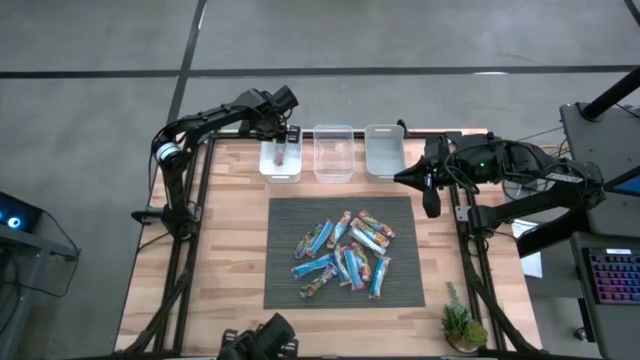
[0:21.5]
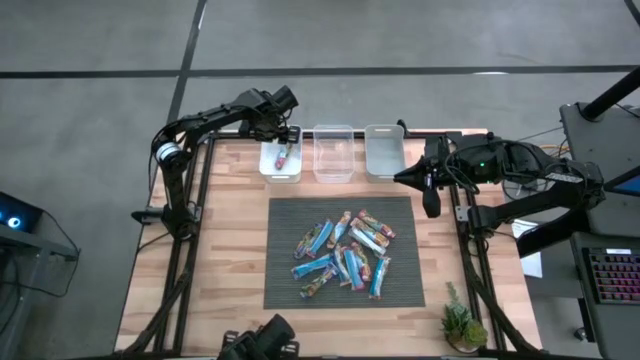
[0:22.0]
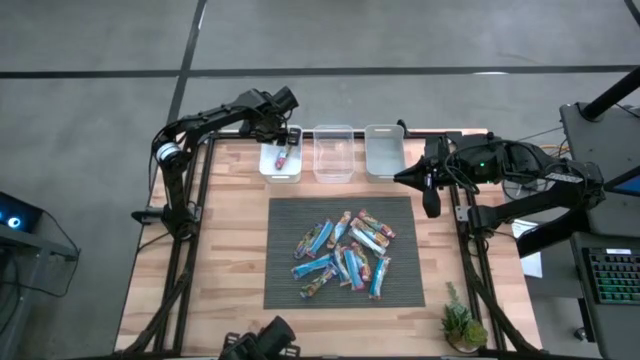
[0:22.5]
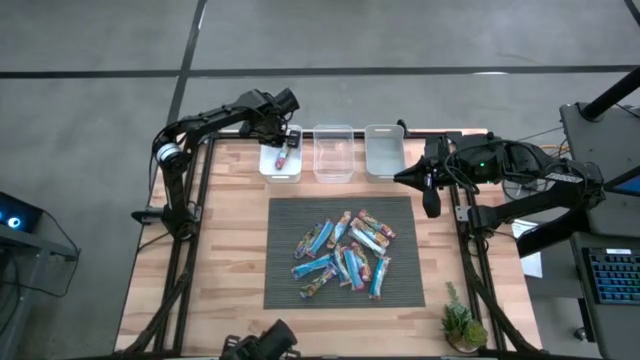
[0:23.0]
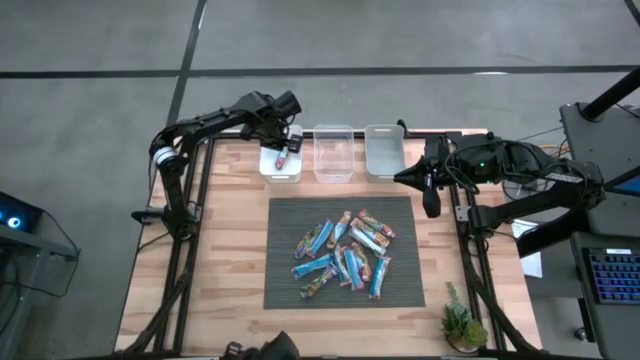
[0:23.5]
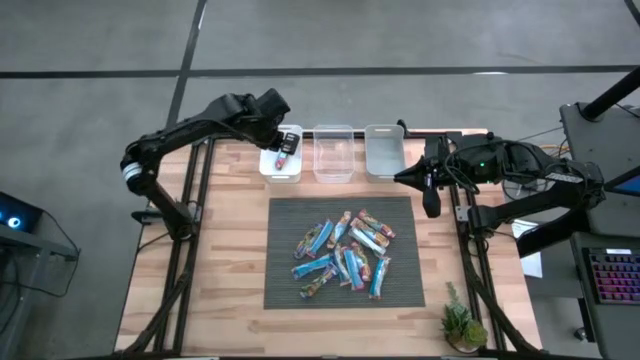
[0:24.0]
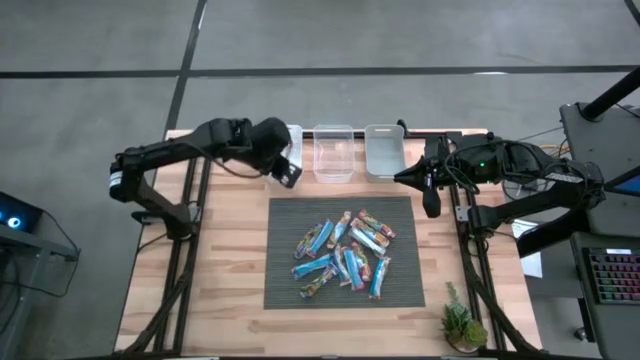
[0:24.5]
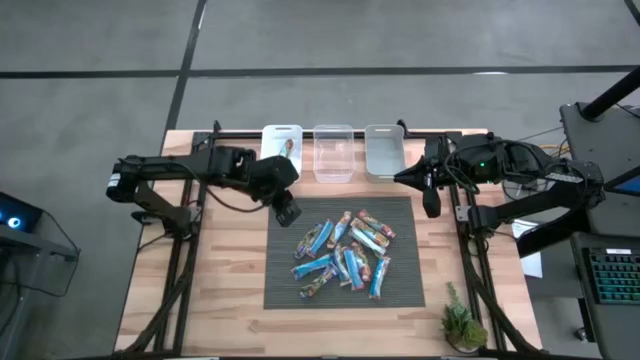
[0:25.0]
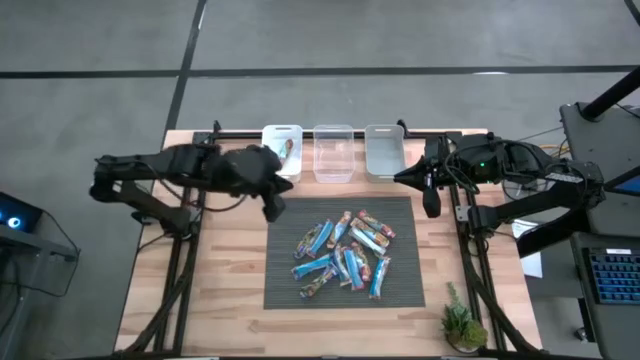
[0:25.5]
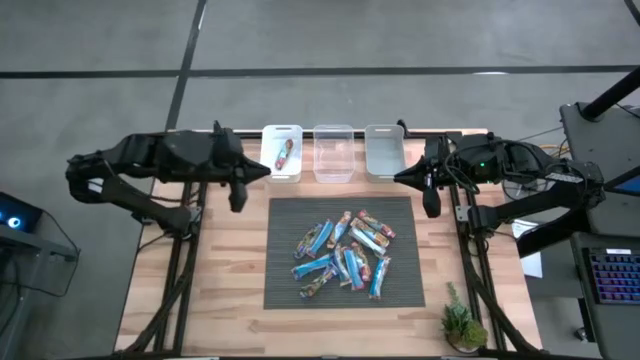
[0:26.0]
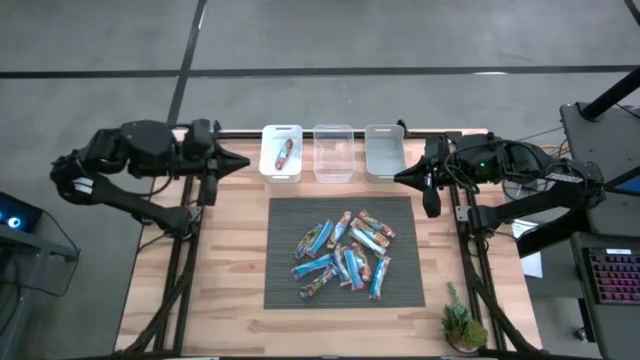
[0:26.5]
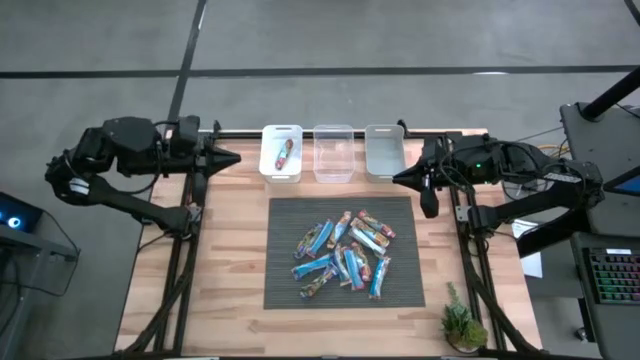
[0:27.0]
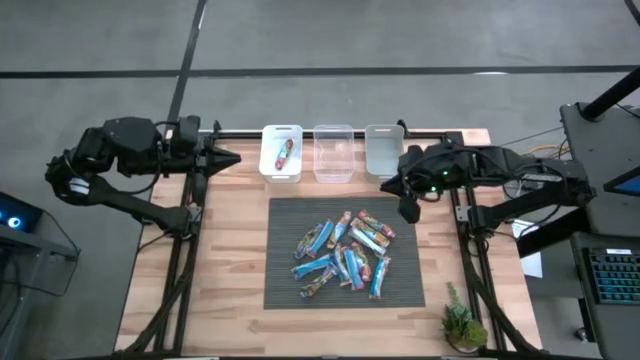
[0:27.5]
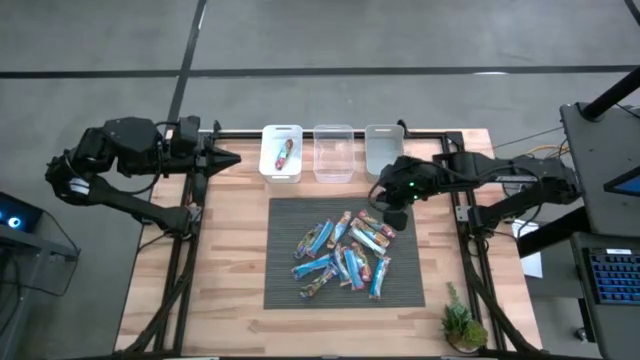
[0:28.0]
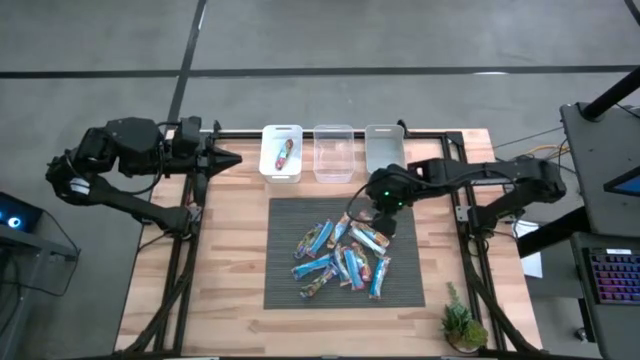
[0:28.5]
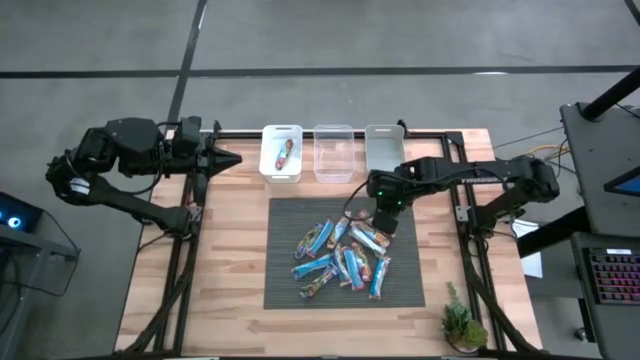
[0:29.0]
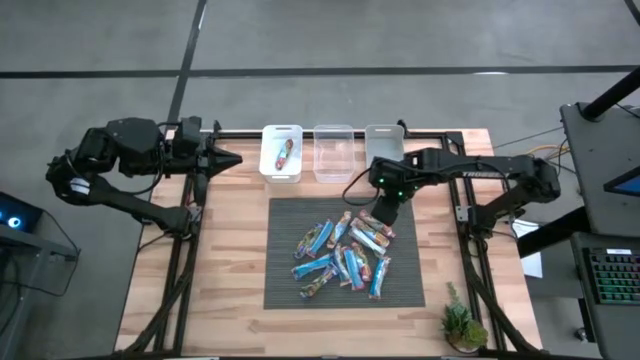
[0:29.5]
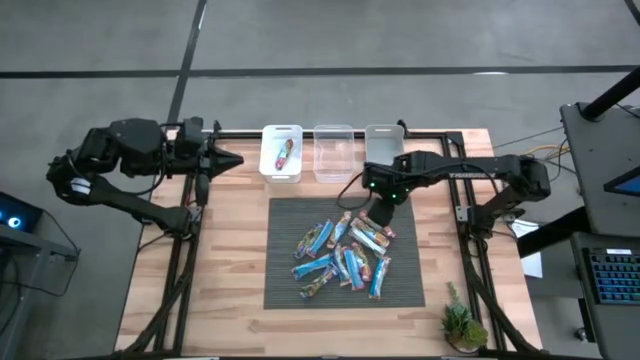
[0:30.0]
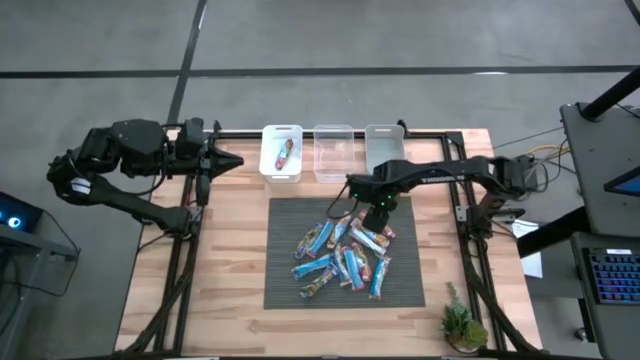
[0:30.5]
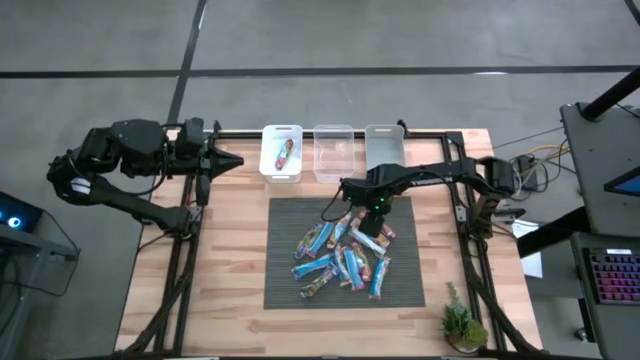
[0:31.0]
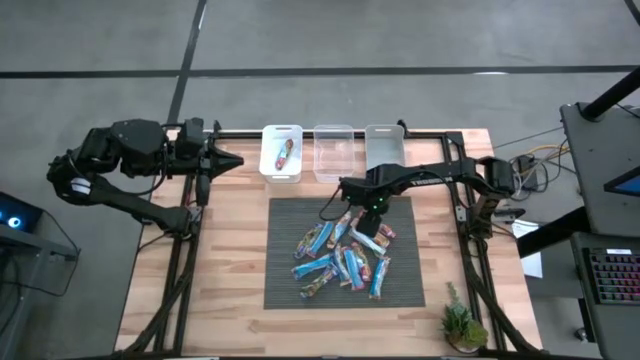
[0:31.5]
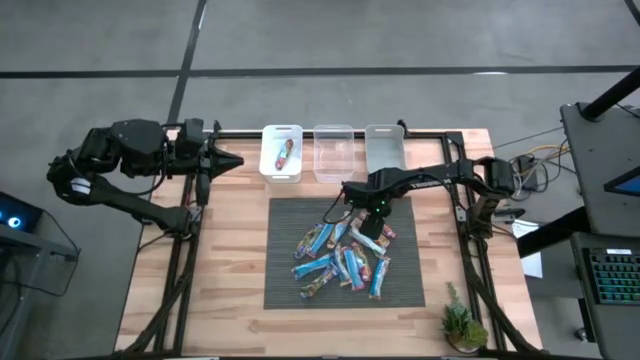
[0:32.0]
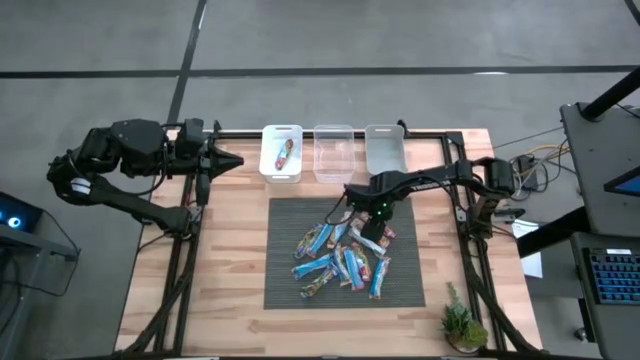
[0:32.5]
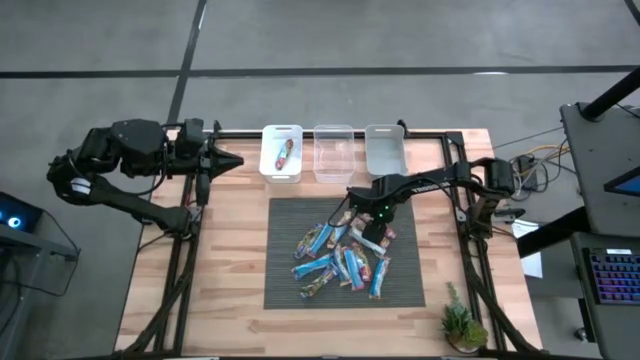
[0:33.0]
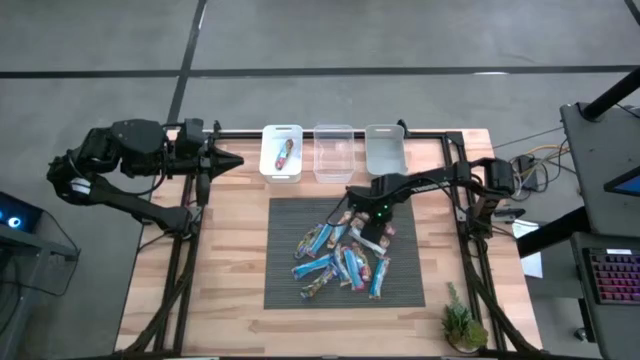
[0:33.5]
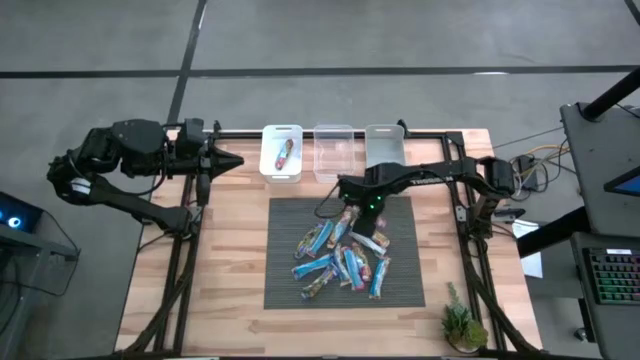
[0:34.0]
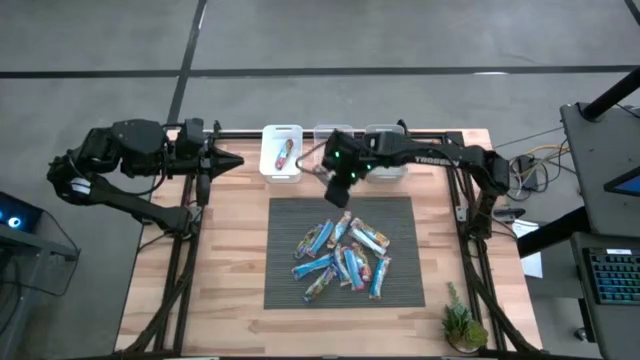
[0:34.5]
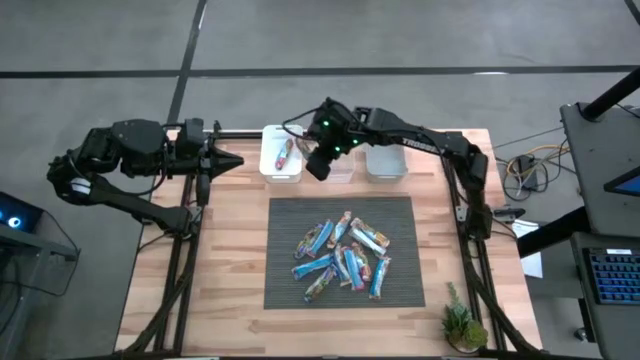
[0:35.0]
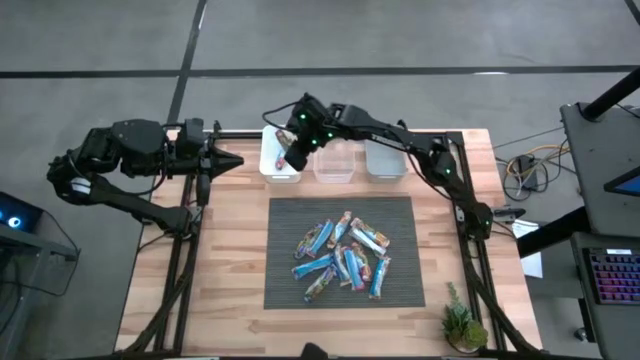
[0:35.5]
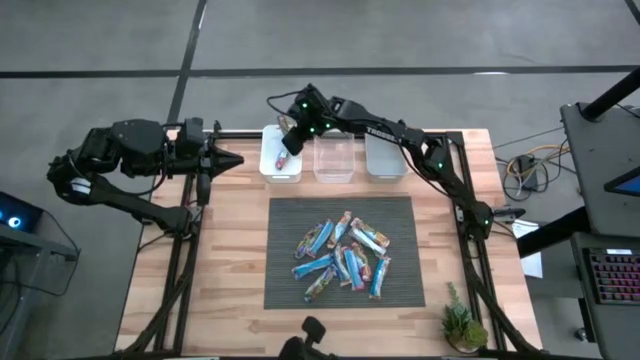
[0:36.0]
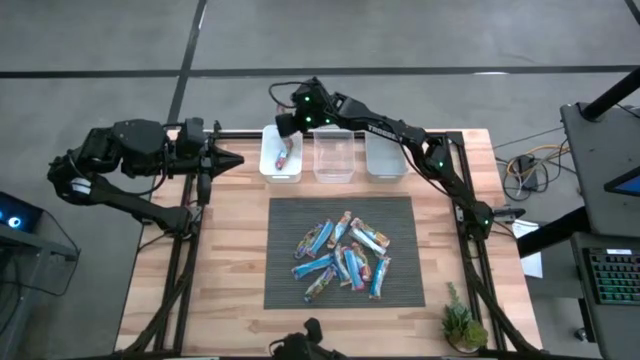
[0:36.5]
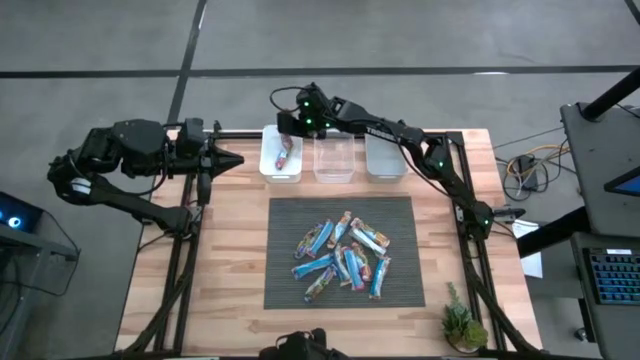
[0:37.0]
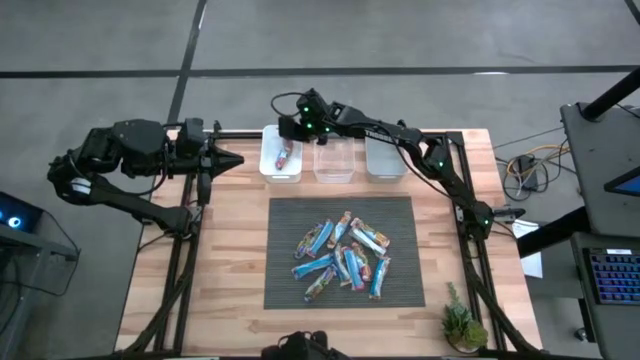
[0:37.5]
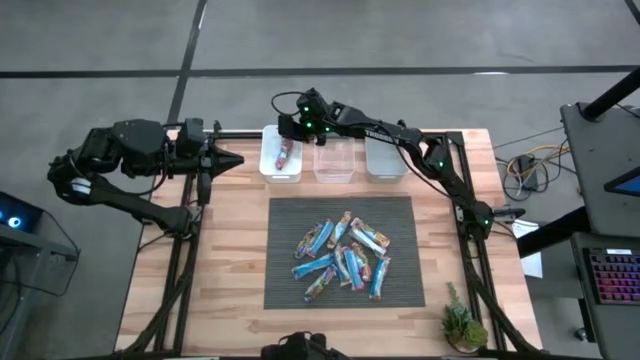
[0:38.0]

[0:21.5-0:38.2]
Task: Pick and place Granola Bars by type
Put the red granola bar into the white bin

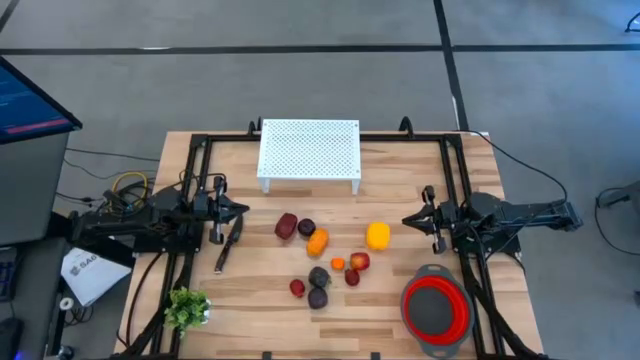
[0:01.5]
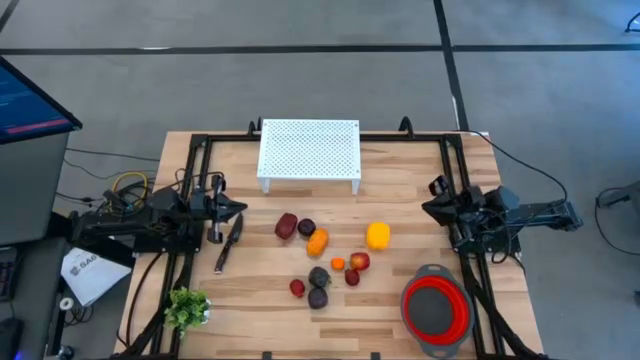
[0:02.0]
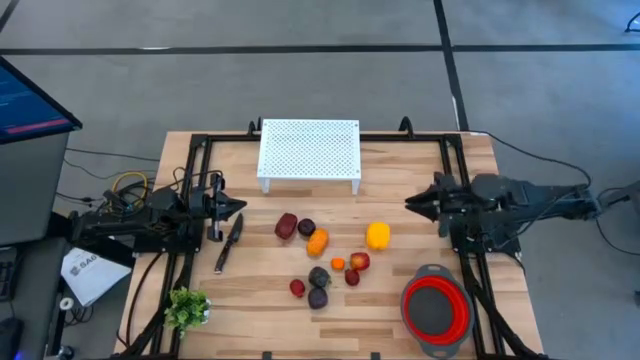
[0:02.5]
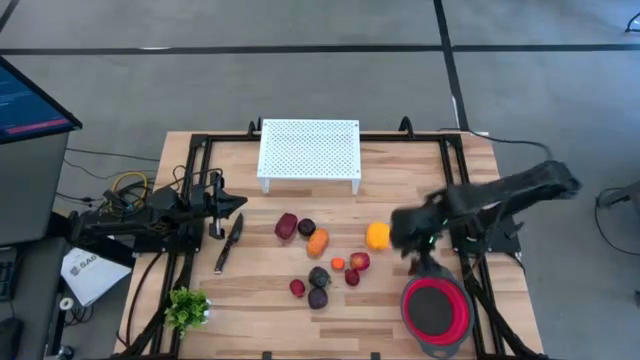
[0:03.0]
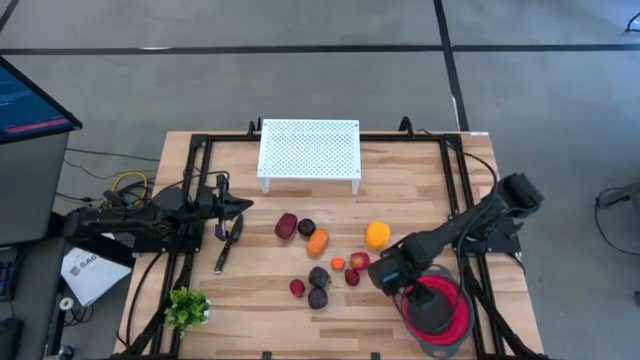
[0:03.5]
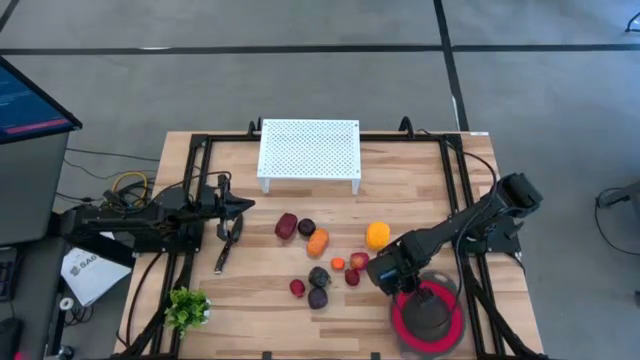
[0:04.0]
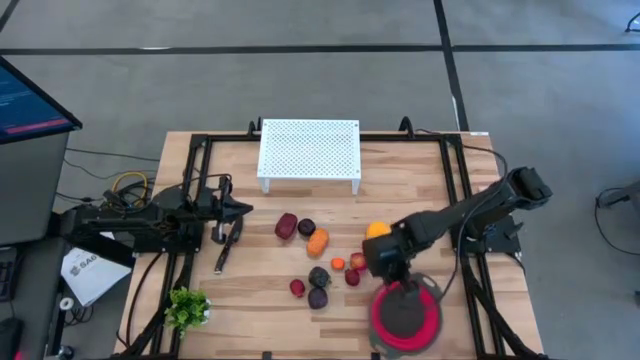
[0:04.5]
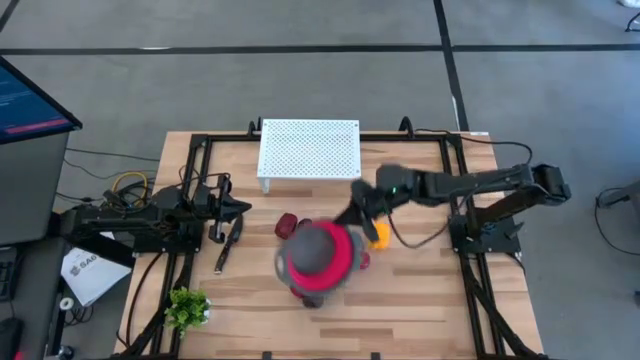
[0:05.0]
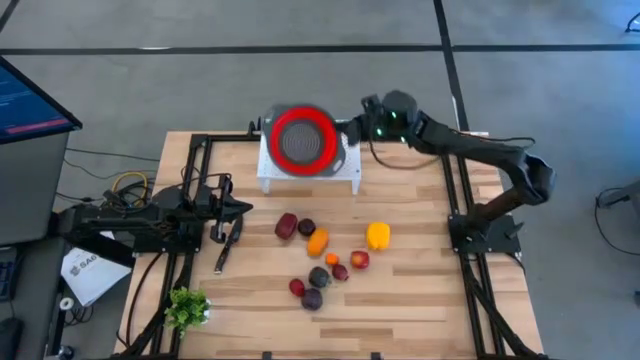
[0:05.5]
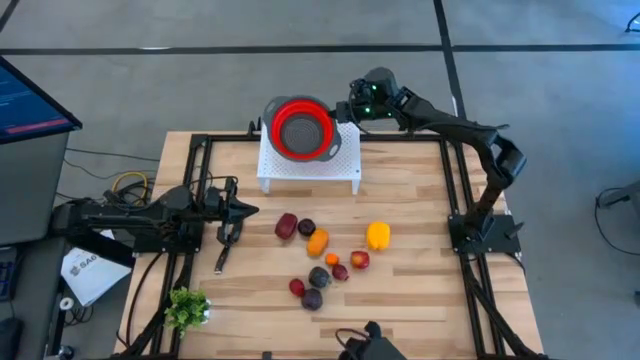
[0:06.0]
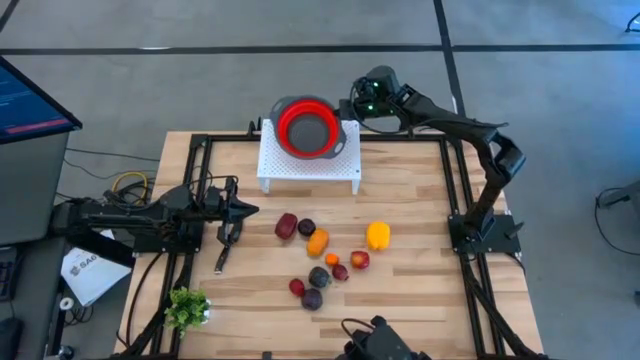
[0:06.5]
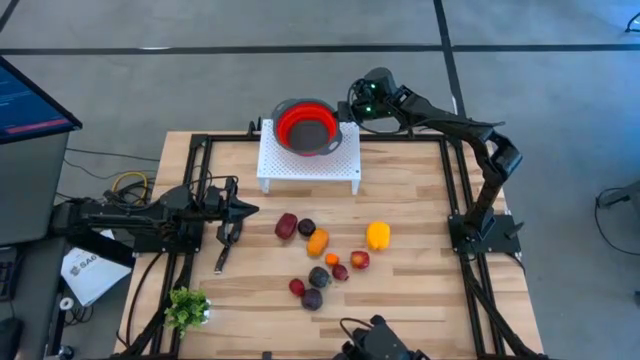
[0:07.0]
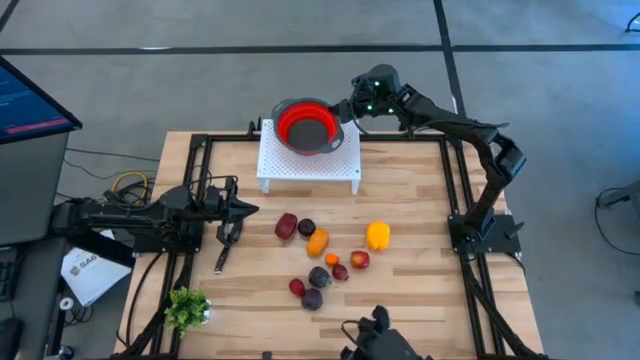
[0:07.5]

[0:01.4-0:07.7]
Task: Pick & Place Fruit
Put the red strainer bowl on the shelf
